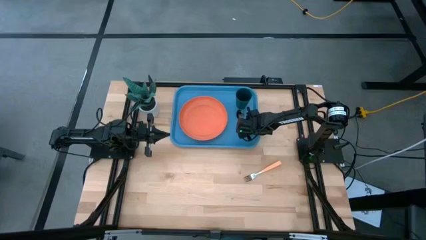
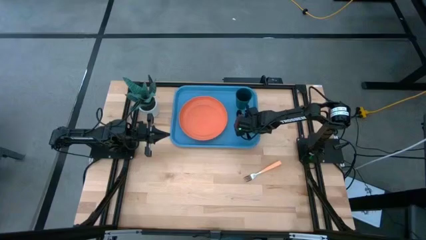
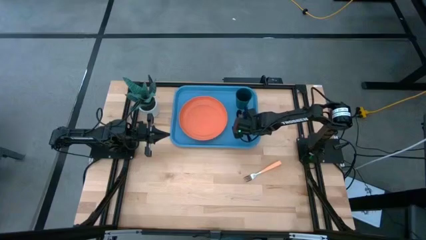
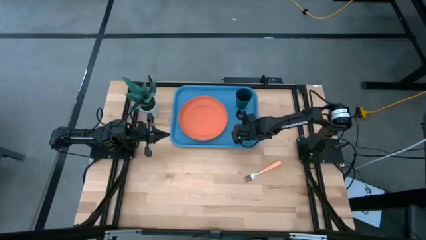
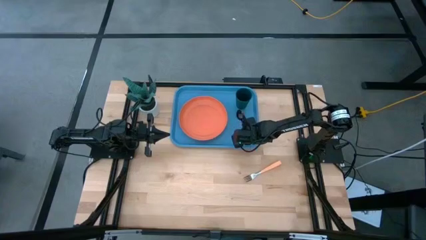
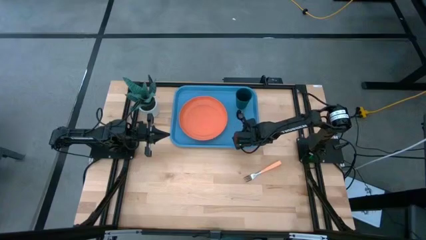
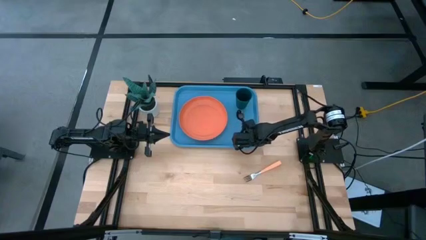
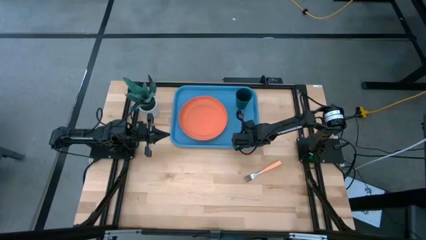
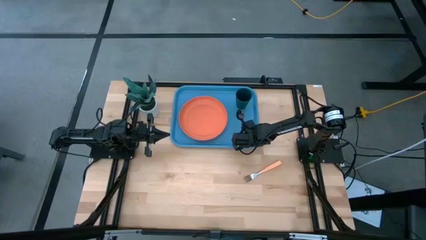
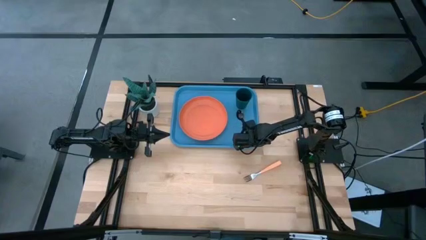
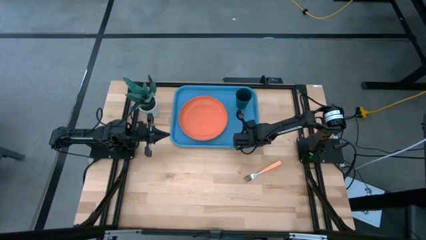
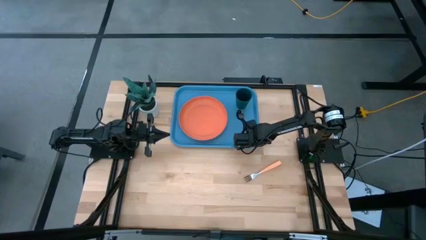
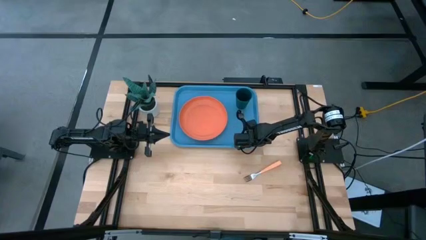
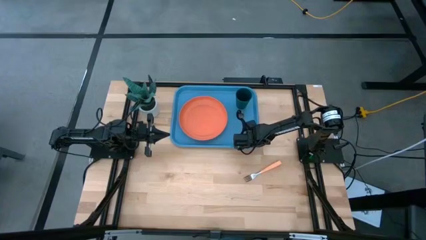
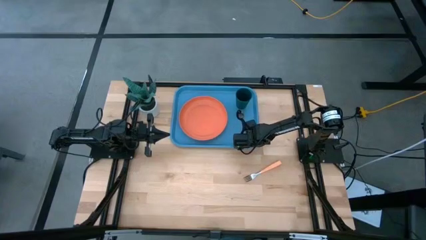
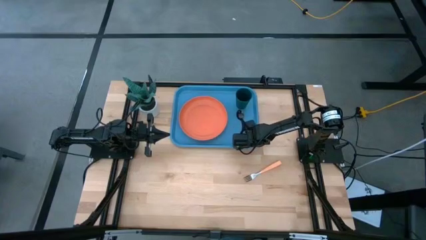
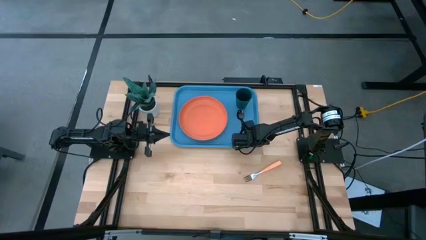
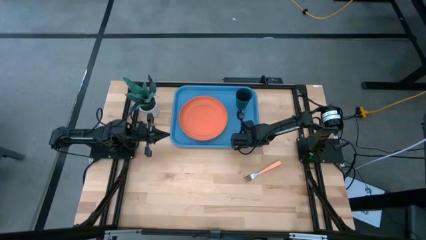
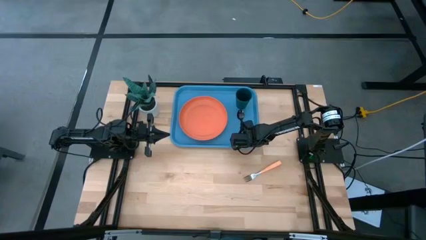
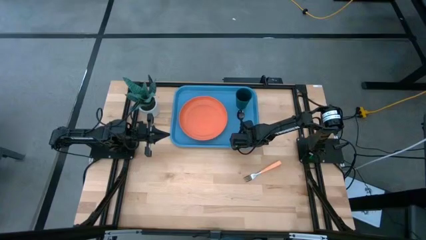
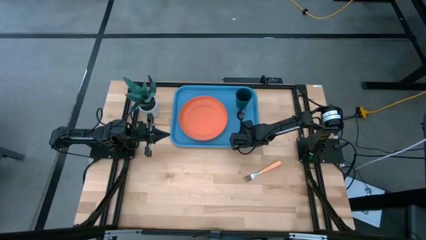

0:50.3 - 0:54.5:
Task: Pick and place plate/cup/fork/spoon on tray
Adjust the black spoon on the blue tray

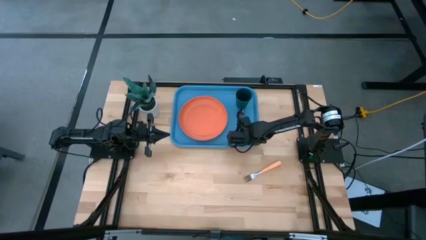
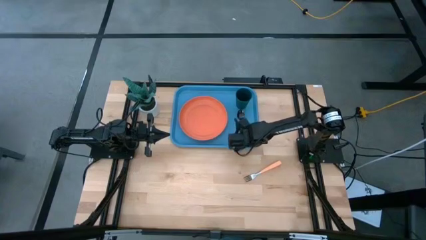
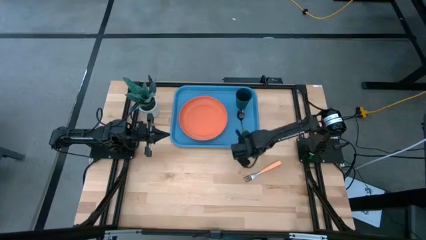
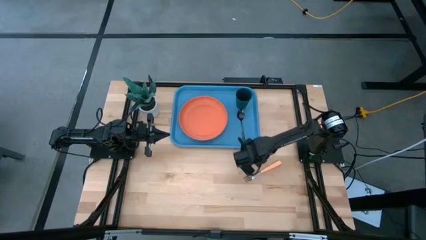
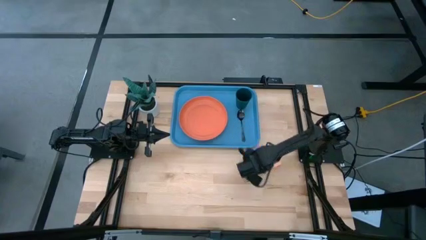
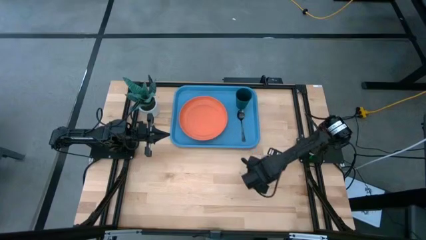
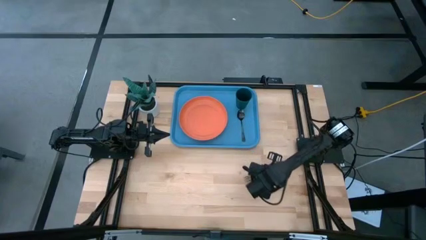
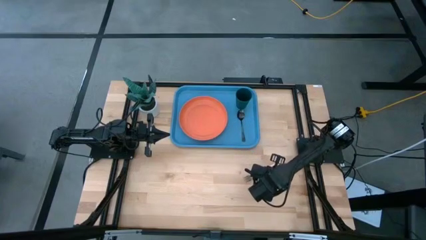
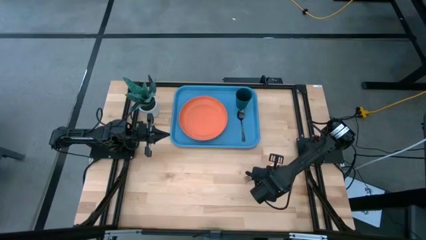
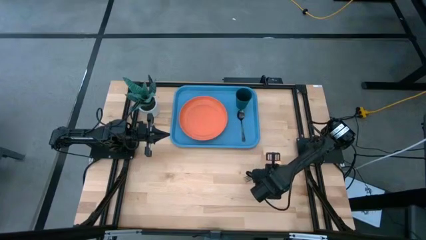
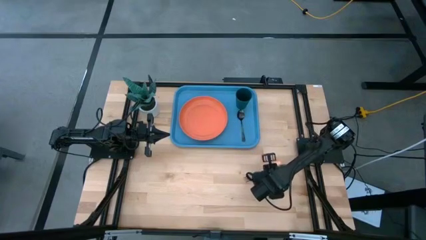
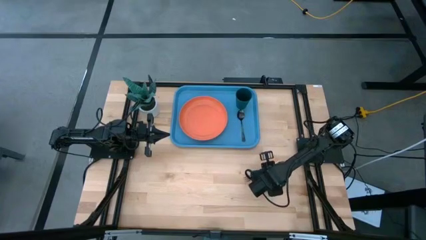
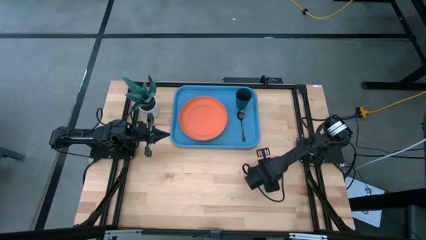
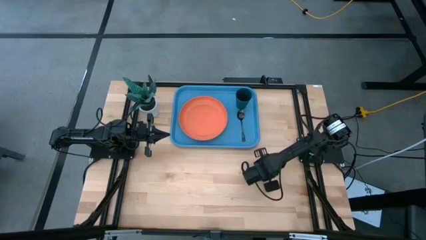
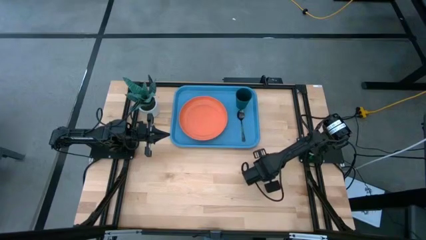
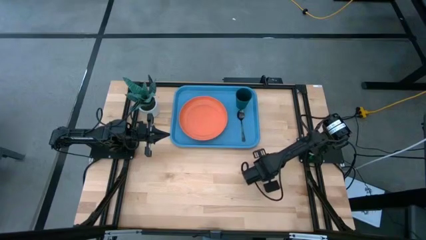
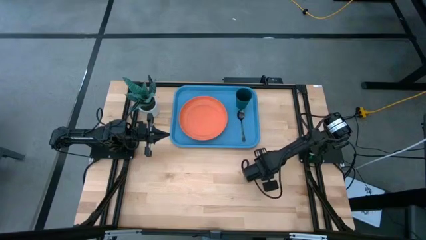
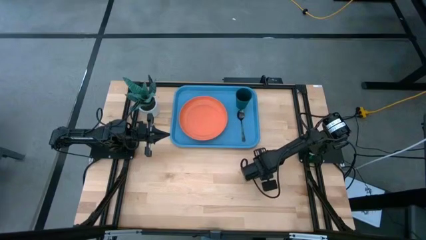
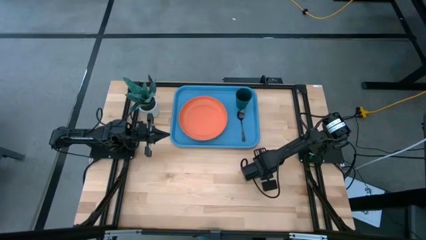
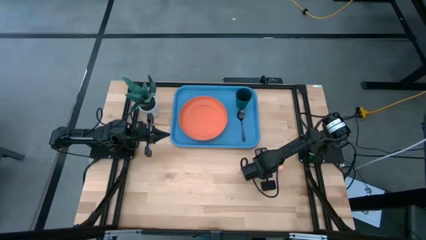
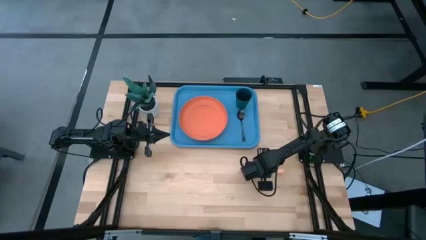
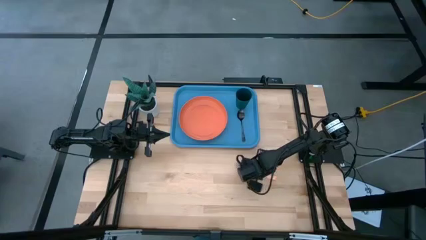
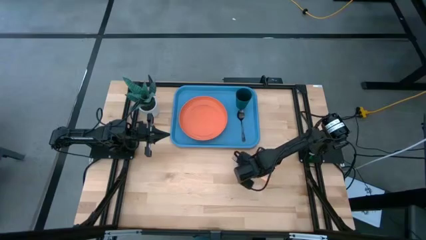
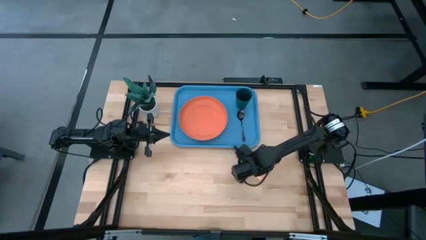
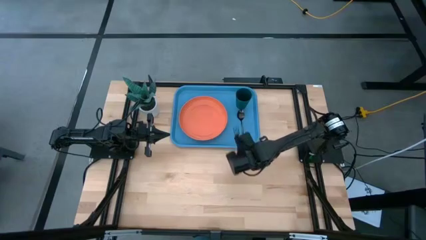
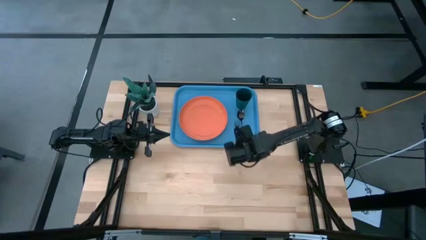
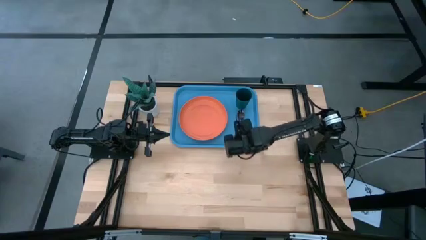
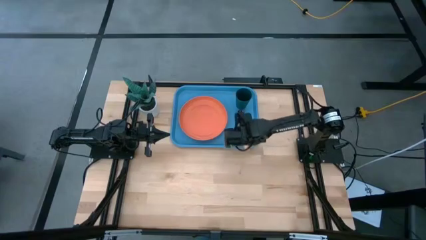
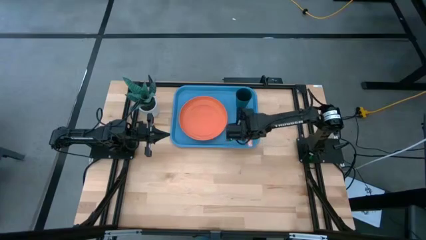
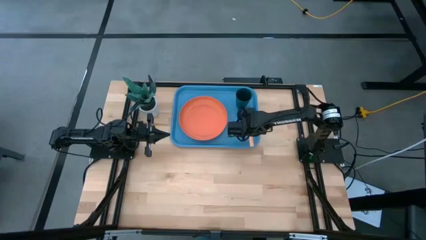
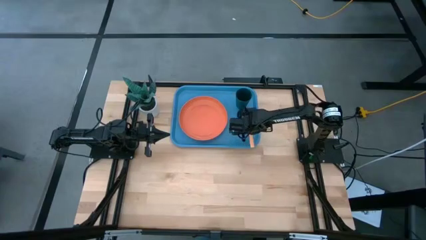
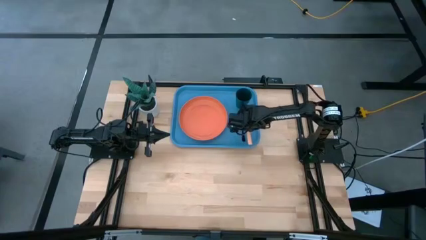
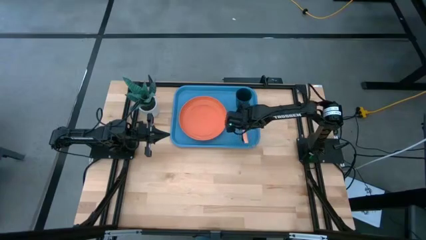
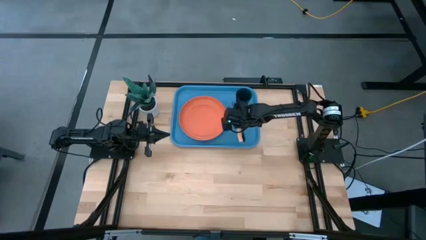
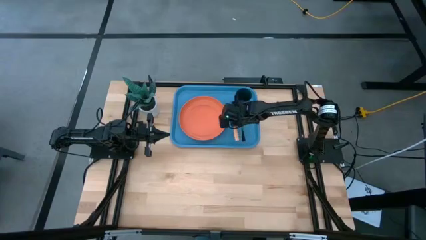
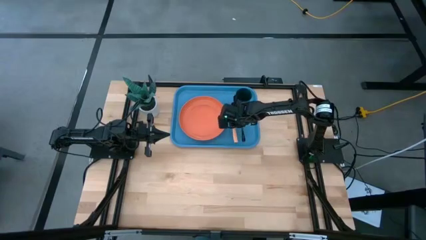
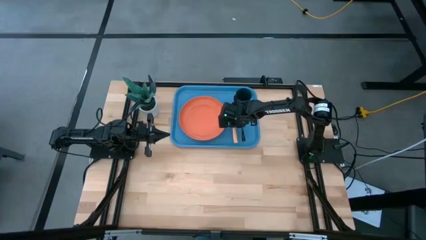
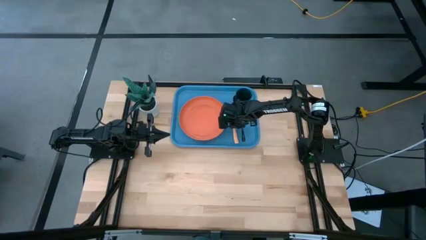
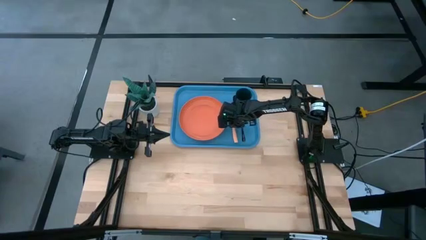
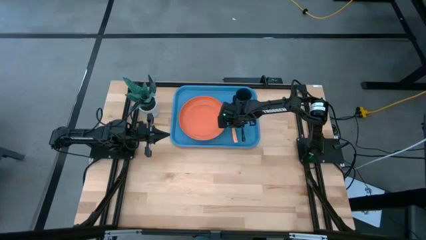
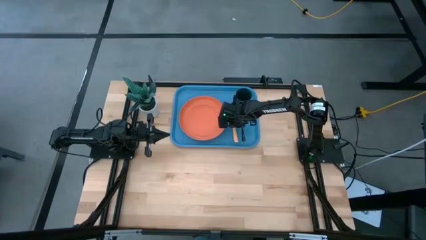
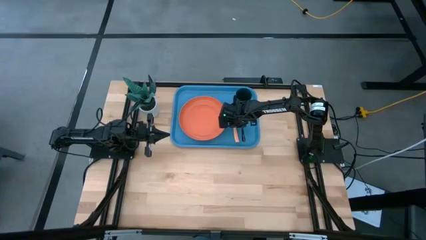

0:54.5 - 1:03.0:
Put the light orange fork on the blue tray

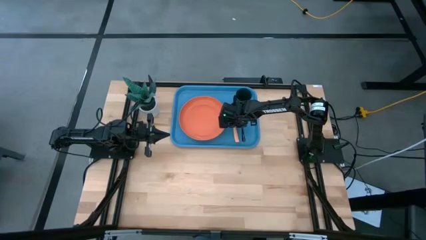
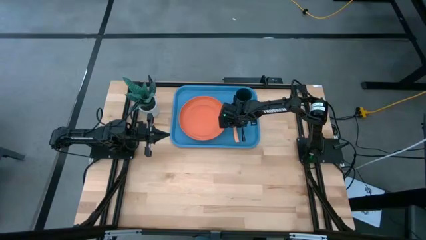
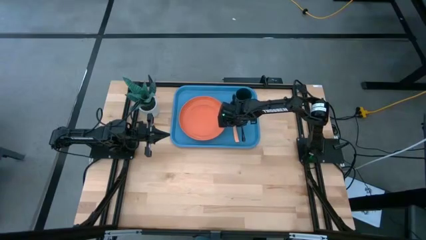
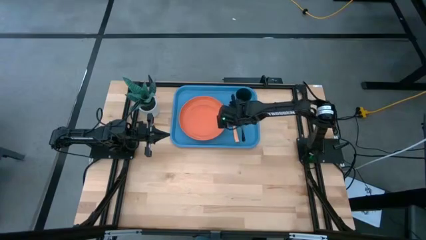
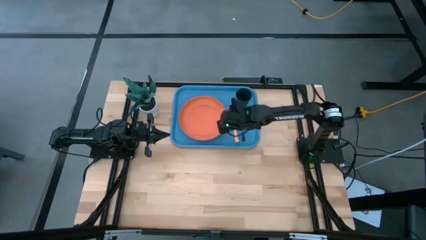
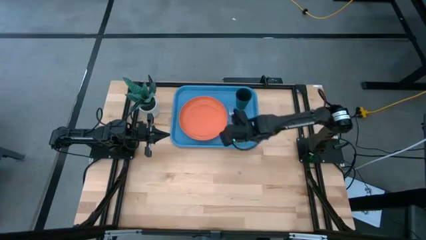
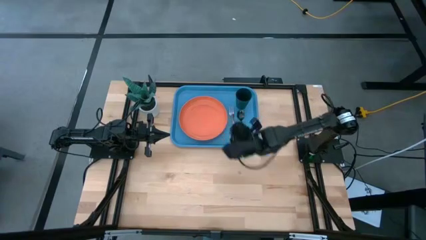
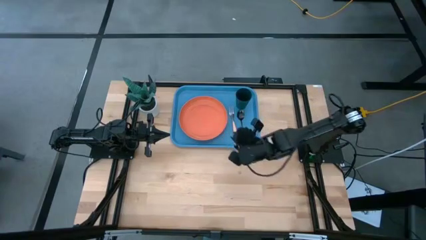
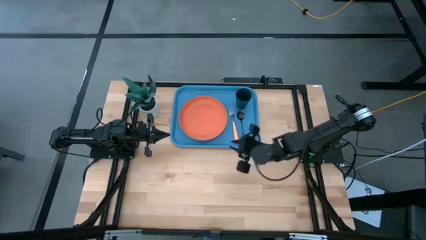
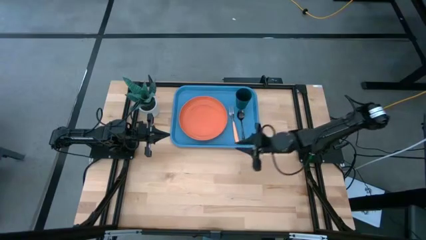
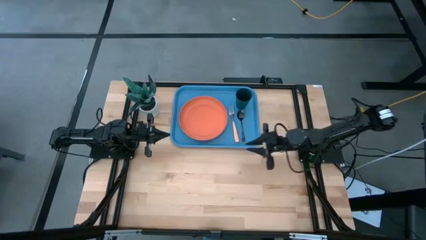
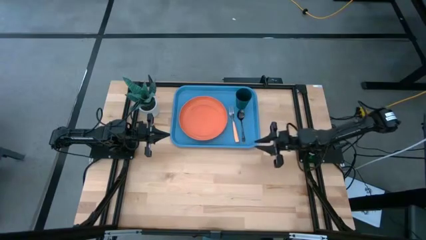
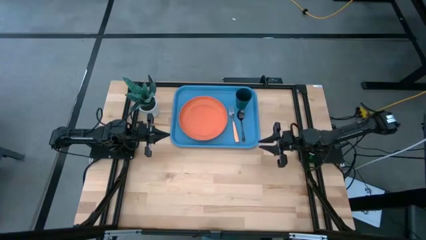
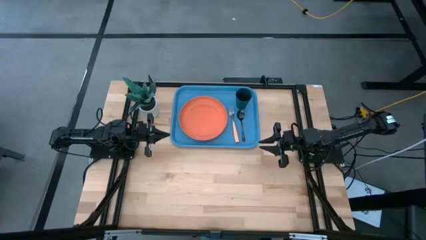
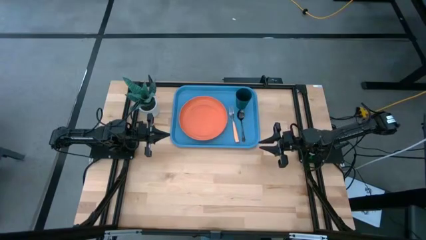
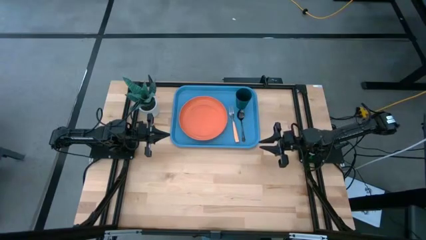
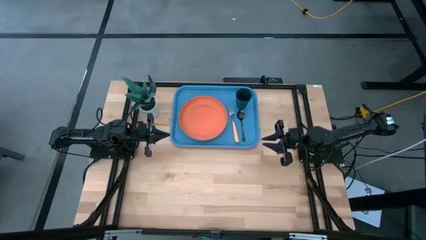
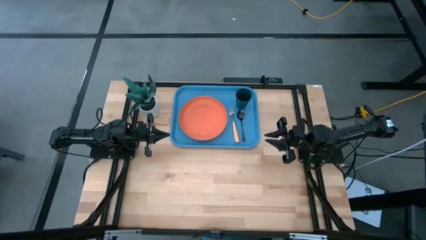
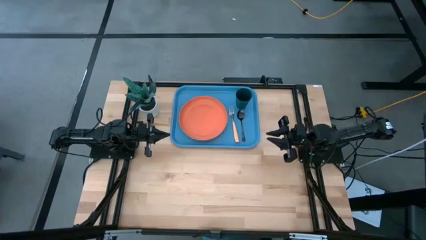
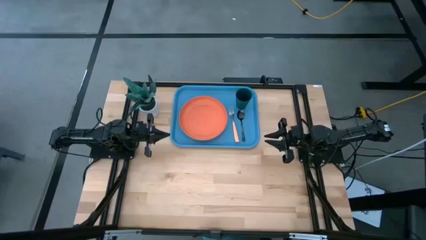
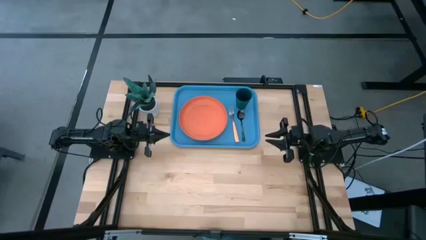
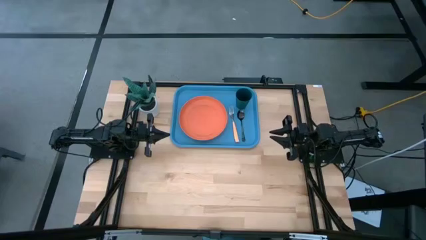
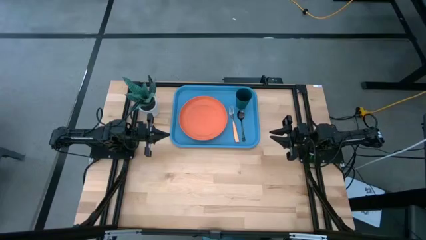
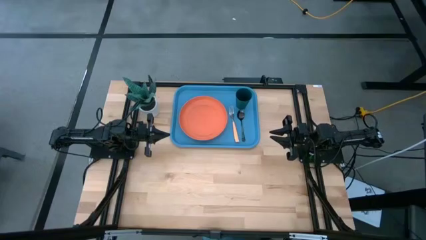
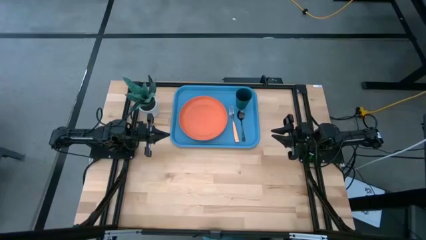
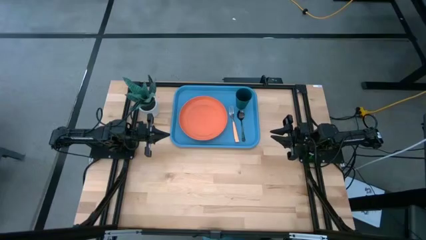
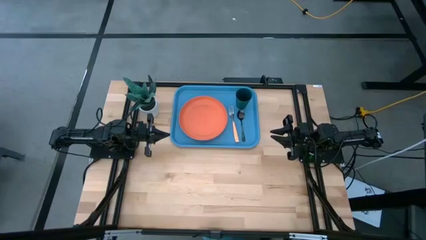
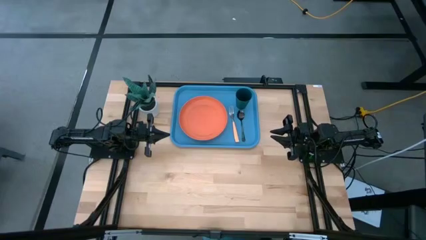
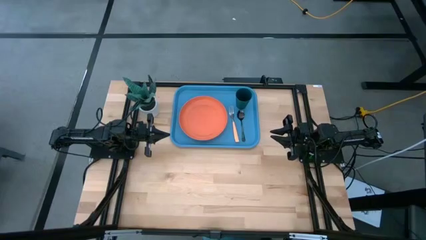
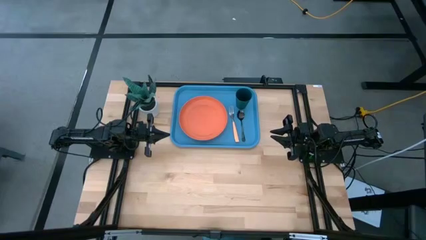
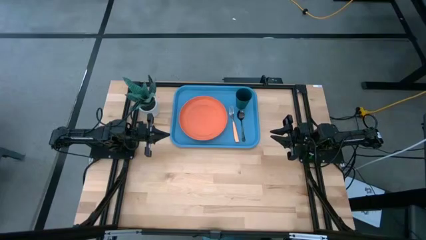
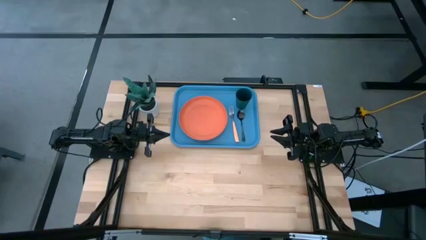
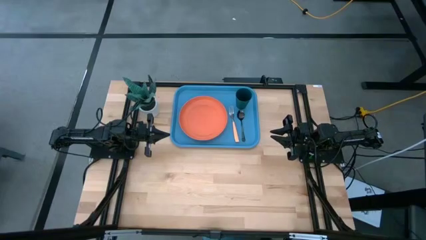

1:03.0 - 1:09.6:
Return to Home Position
